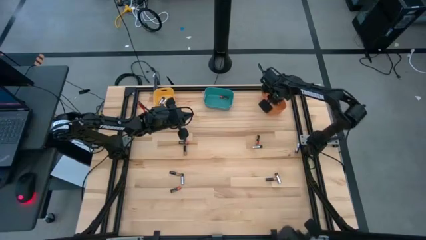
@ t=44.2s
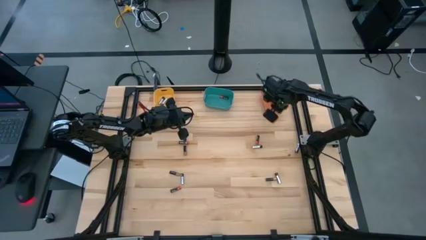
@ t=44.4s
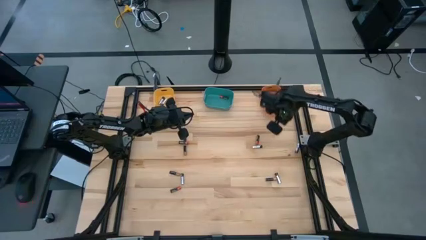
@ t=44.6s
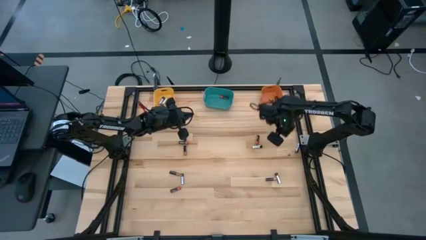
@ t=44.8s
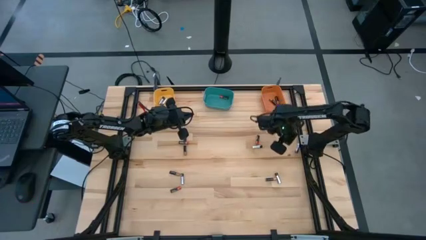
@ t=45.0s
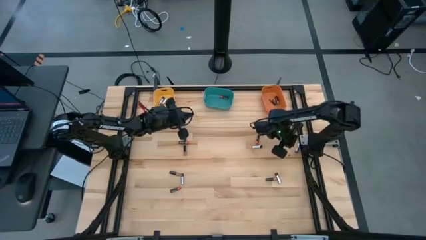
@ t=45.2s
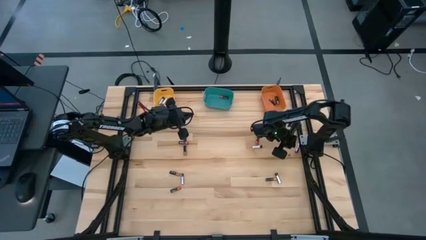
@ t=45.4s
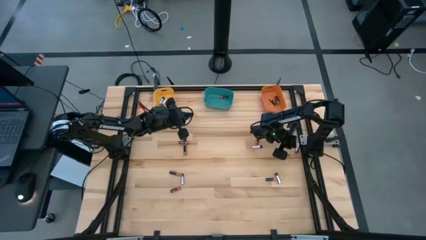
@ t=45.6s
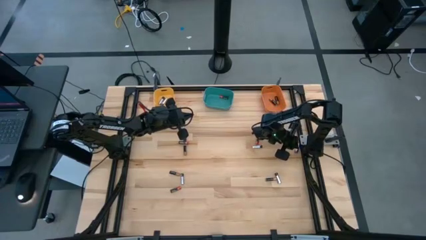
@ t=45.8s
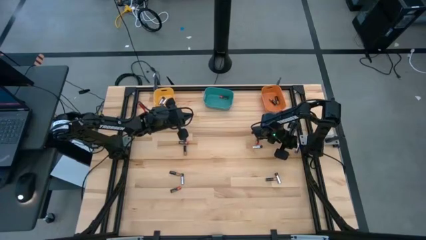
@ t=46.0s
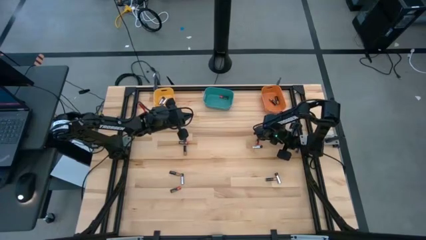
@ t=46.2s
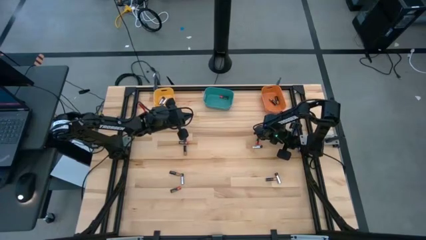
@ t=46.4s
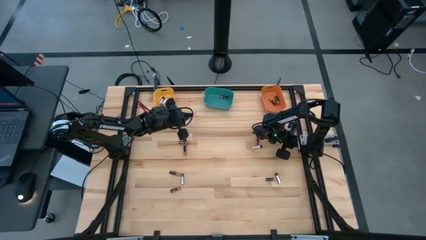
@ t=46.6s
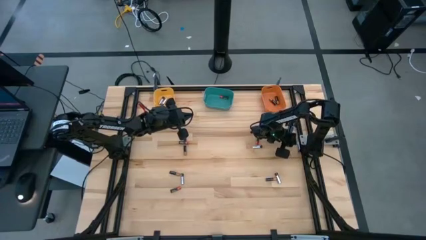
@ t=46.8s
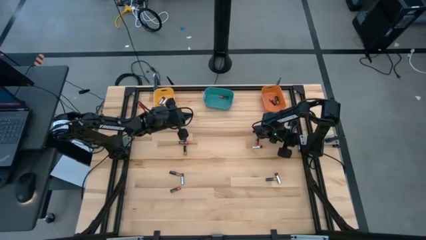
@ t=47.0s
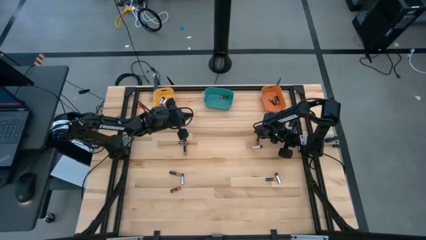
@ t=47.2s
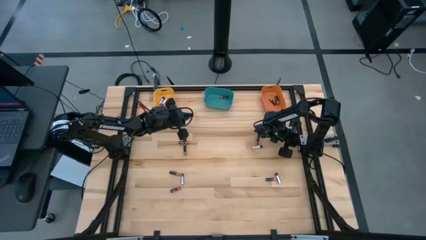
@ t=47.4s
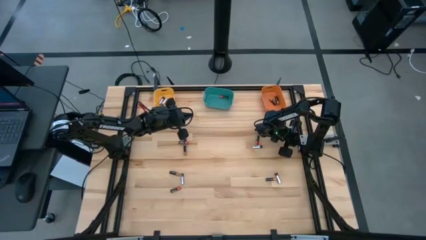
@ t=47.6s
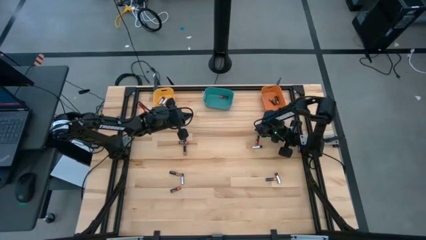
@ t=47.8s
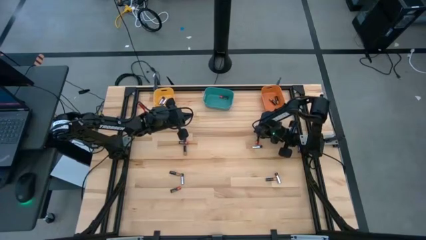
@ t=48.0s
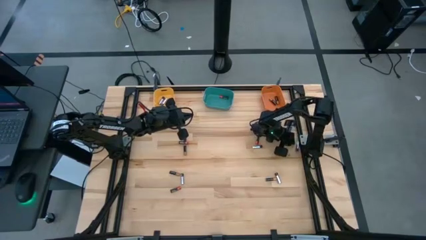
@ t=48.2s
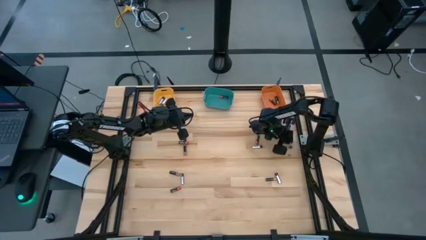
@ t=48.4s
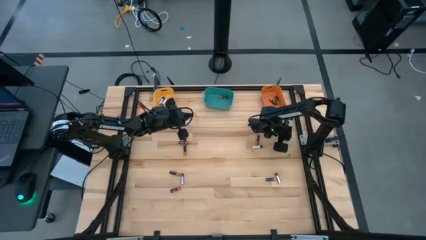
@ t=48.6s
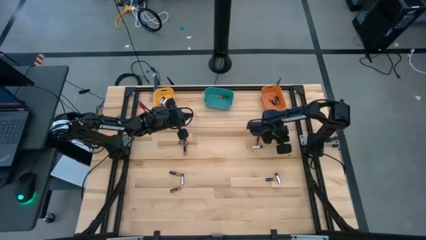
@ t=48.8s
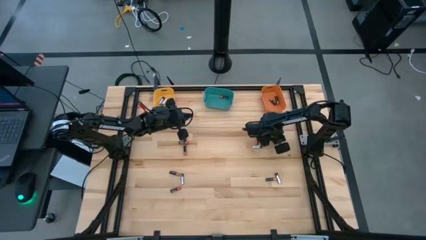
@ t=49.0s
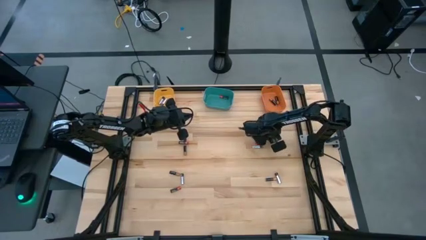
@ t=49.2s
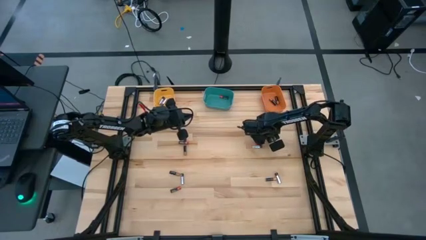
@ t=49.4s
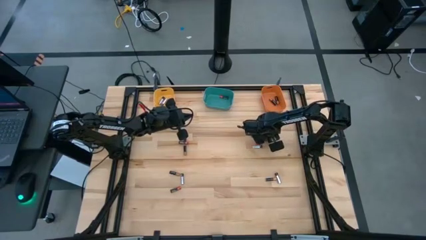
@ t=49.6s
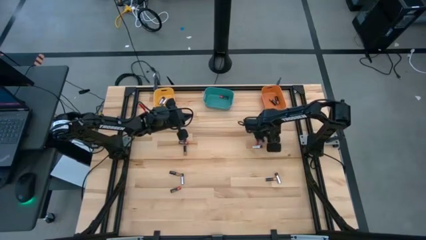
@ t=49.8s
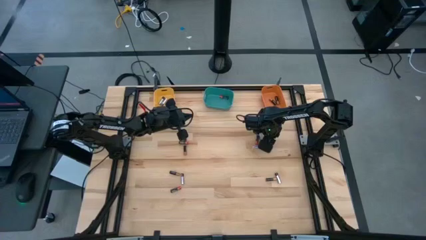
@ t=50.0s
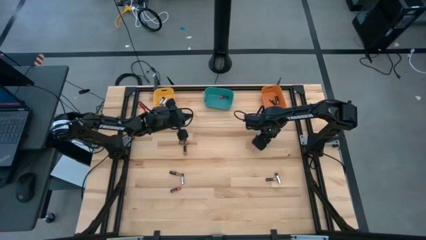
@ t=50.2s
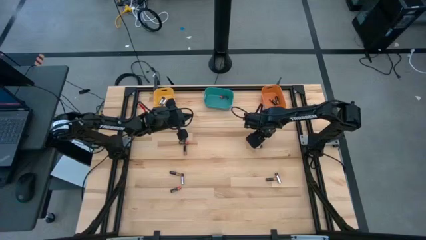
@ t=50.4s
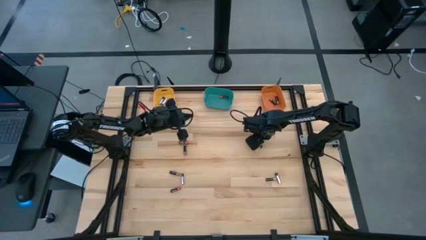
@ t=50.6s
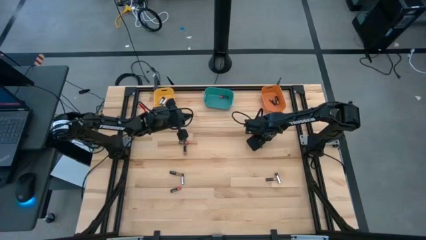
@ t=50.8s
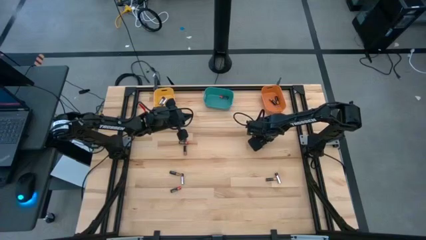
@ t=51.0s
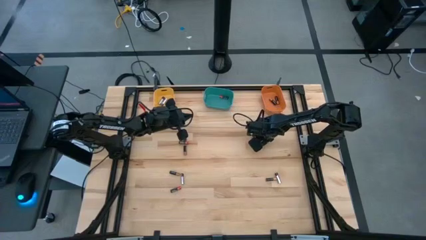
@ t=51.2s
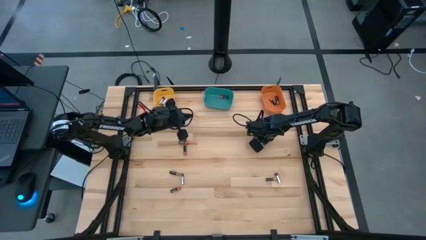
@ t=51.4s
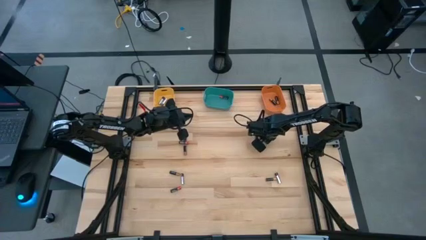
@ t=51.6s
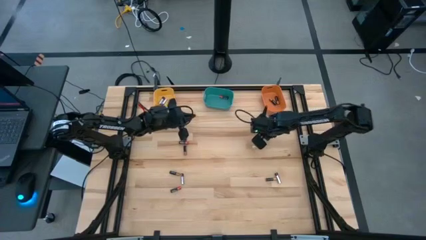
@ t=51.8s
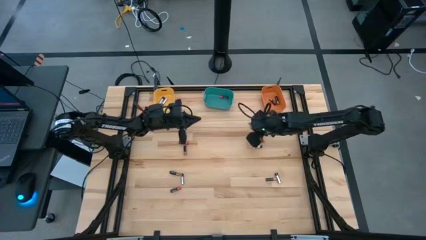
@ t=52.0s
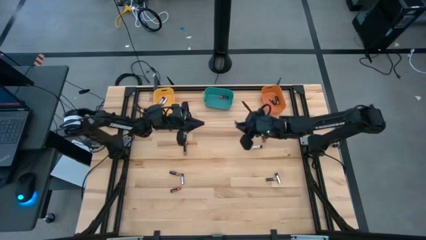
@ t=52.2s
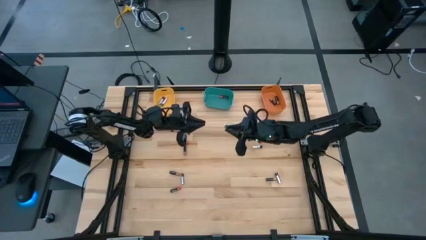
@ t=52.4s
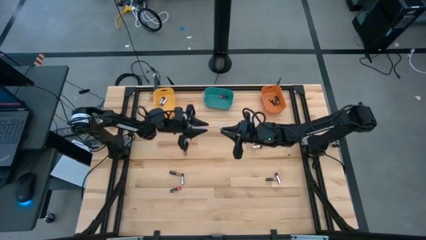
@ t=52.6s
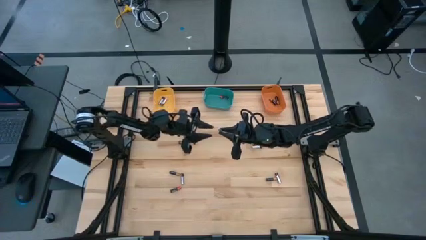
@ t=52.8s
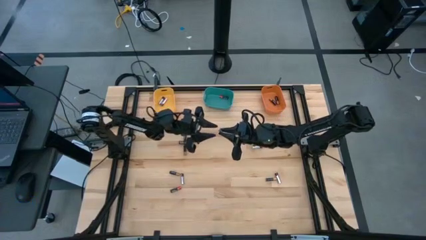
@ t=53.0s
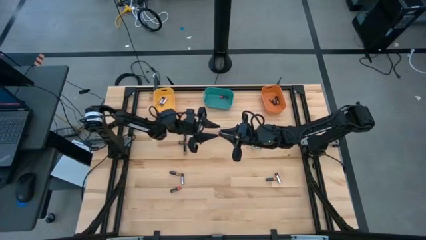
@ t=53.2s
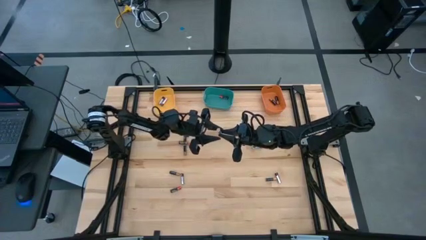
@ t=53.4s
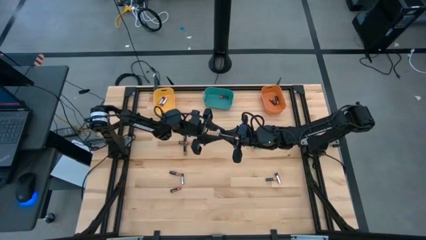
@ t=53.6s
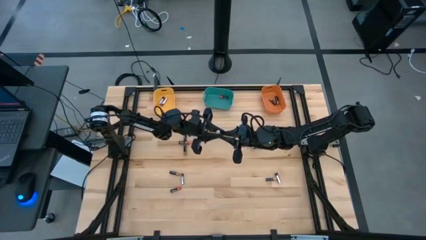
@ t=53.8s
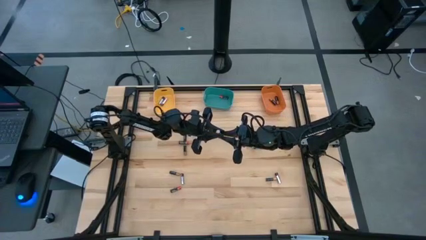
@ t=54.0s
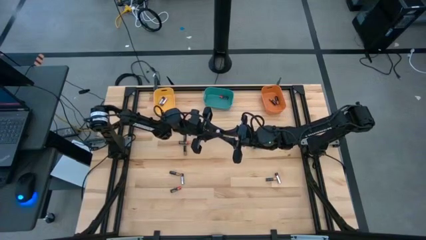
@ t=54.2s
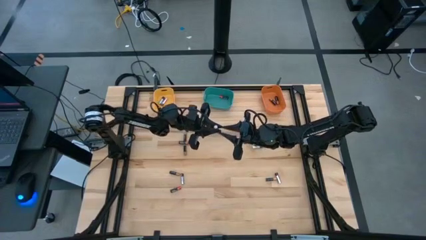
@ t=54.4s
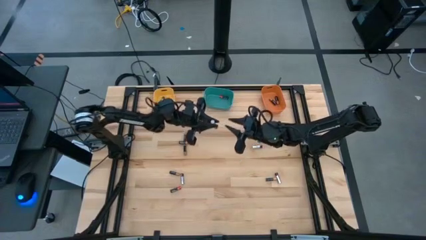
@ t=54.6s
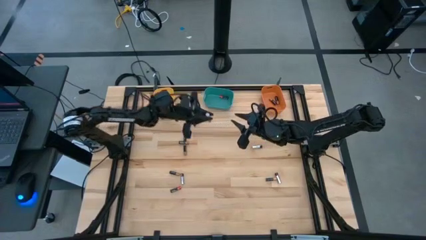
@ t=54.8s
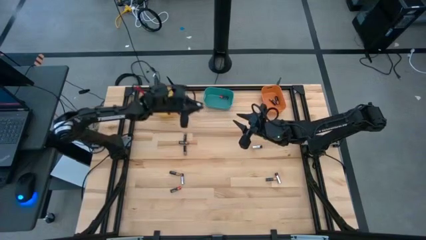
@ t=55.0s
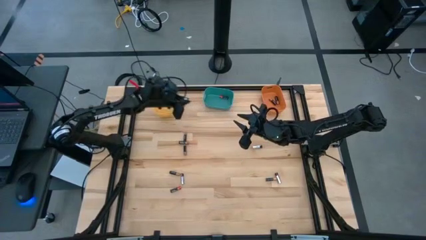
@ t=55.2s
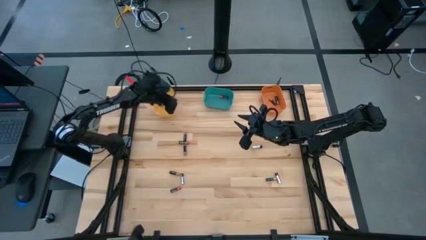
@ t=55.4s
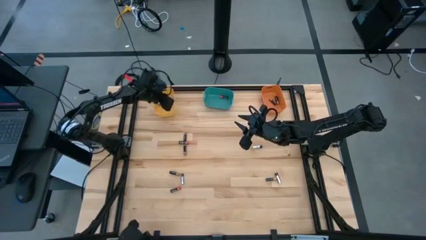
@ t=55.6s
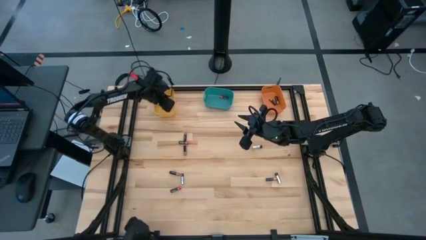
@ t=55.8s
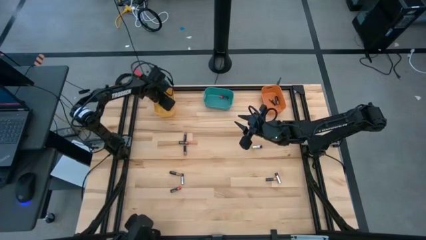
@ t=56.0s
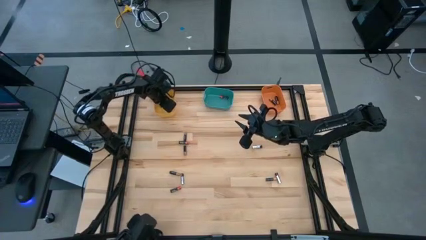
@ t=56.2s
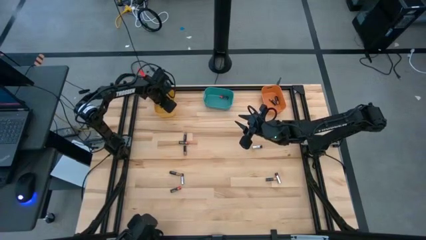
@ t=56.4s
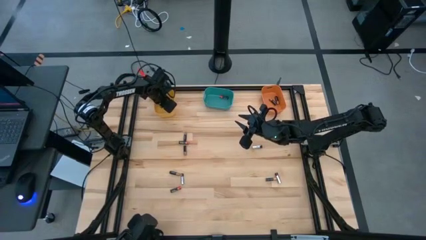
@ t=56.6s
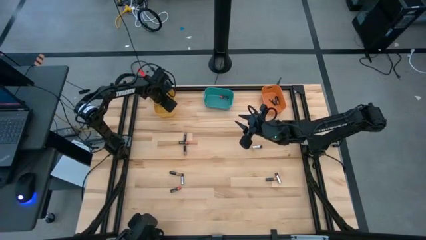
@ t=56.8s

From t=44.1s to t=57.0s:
Task: Sort batteries
Put the silver battery into the yellow bin

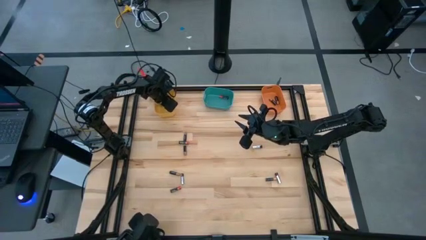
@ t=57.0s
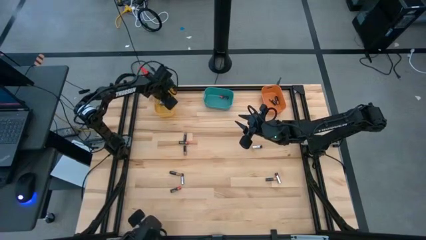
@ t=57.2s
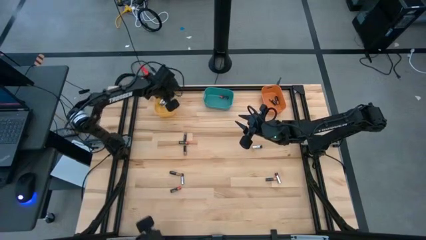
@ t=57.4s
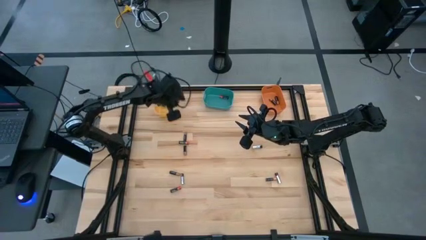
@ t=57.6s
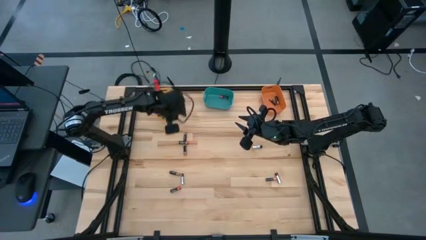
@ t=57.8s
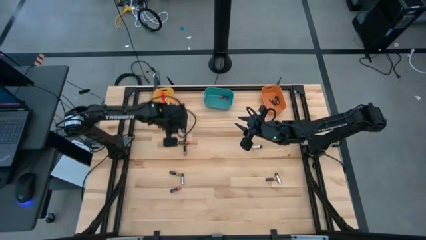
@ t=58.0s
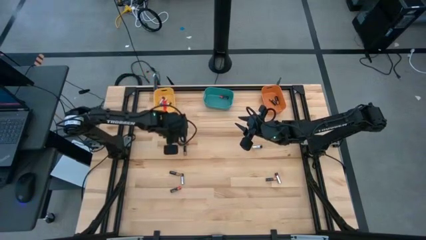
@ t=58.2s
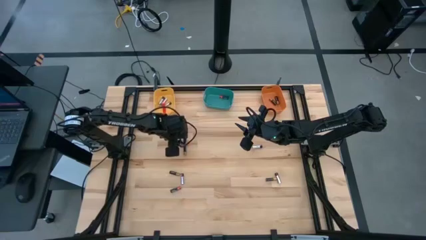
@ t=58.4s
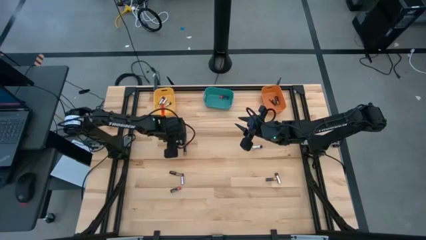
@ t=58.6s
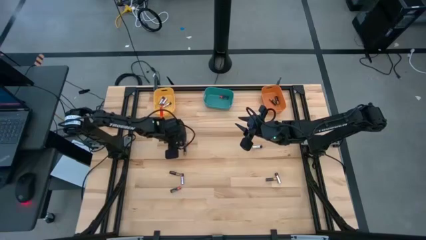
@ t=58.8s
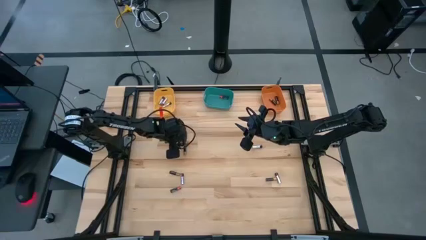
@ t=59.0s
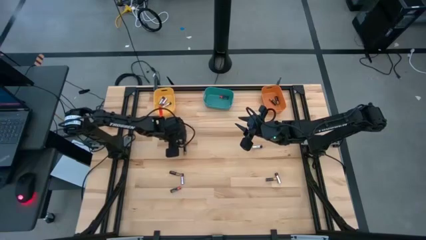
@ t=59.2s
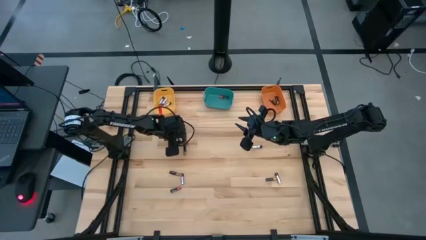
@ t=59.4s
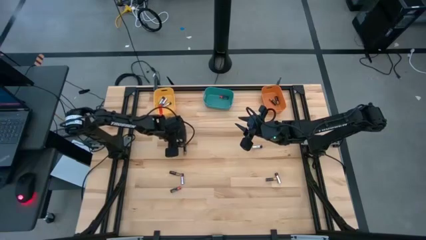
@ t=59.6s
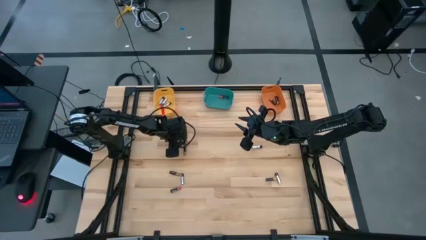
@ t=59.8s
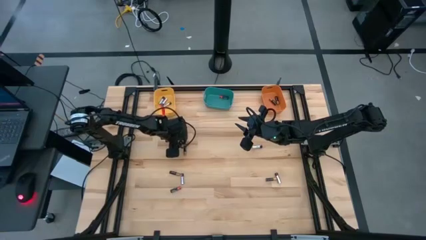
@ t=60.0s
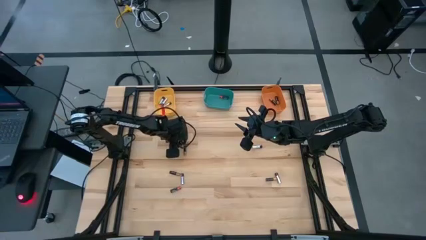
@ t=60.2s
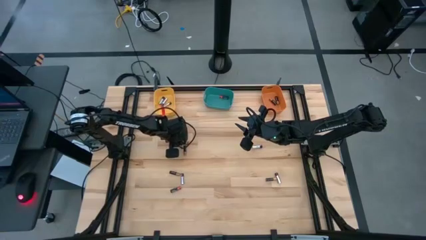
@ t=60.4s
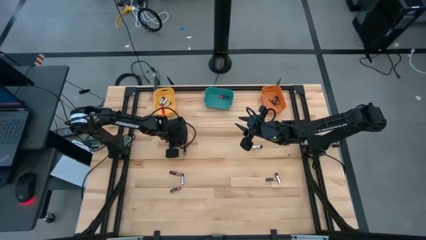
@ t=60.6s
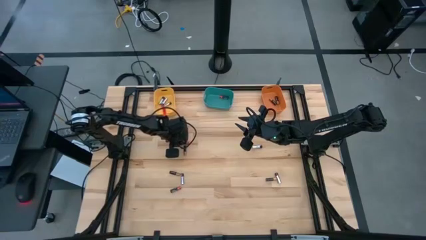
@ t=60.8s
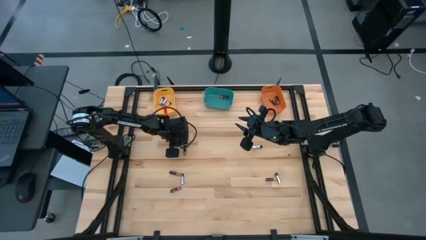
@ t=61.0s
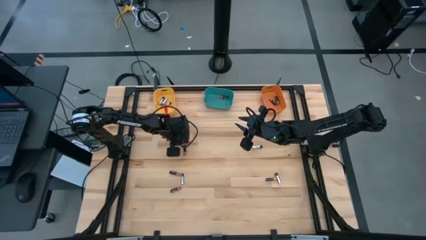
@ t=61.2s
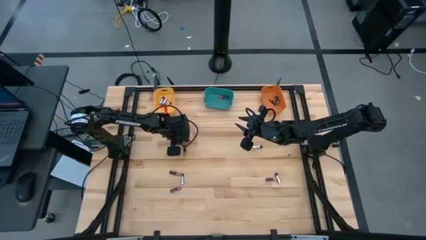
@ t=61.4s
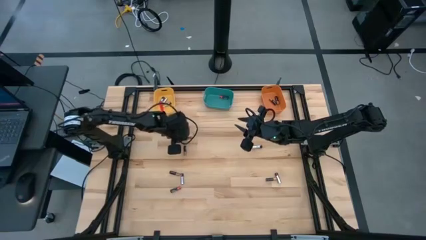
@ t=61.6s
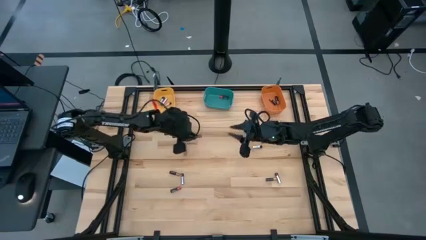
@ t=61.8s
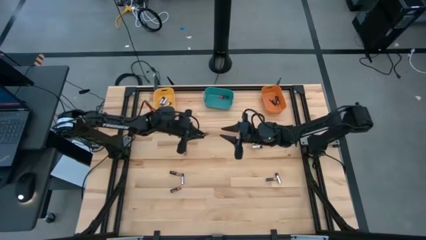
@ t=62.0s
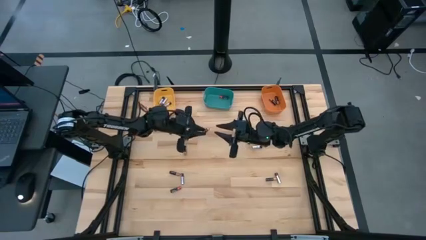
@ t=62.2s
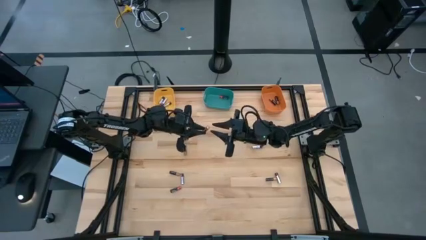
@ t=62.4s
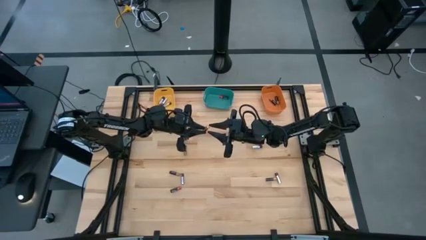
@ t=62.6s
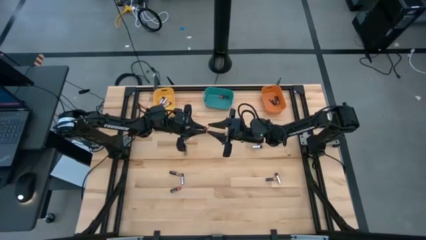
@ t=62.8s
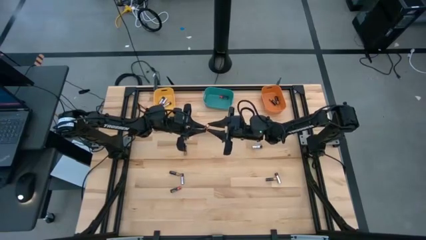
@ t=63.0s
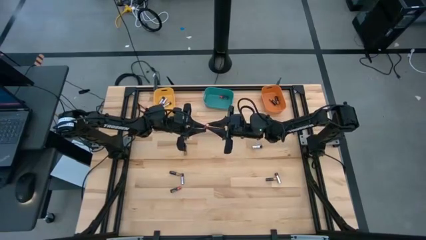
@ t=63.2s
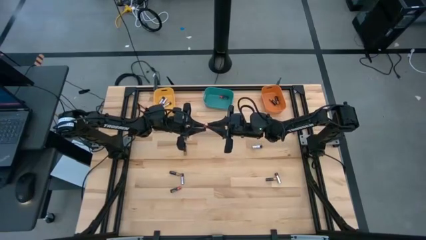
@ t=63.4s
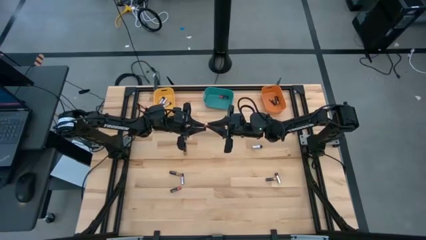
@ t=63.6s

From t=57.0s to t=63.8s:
Put the red battery into the green bin
